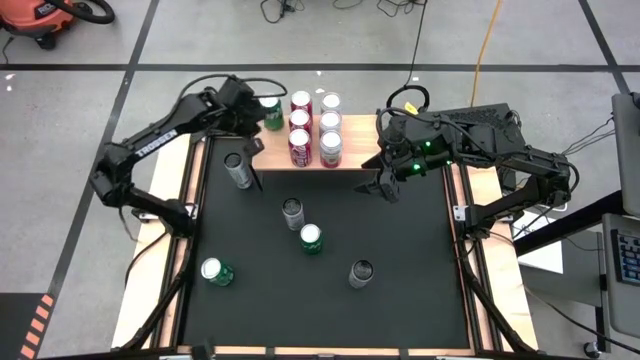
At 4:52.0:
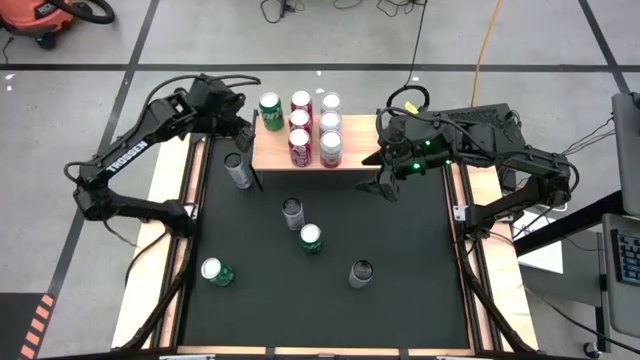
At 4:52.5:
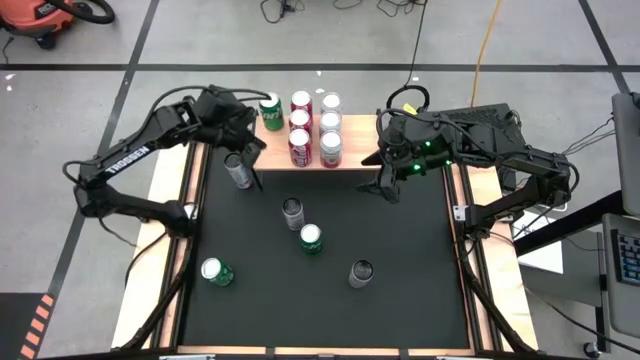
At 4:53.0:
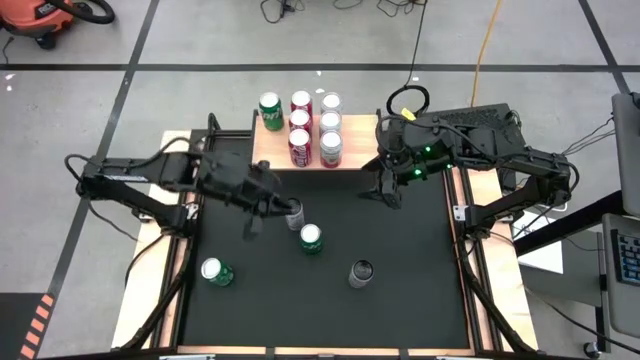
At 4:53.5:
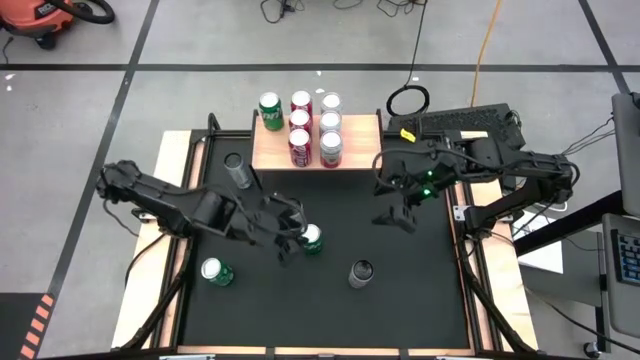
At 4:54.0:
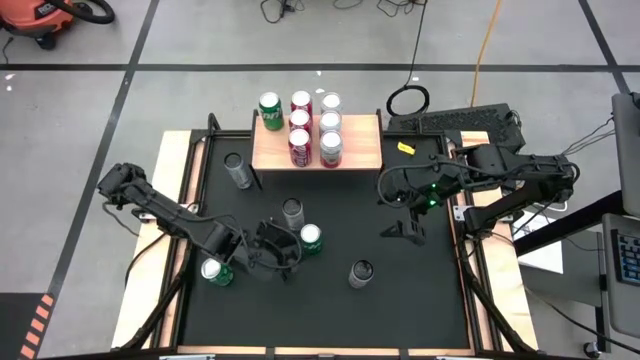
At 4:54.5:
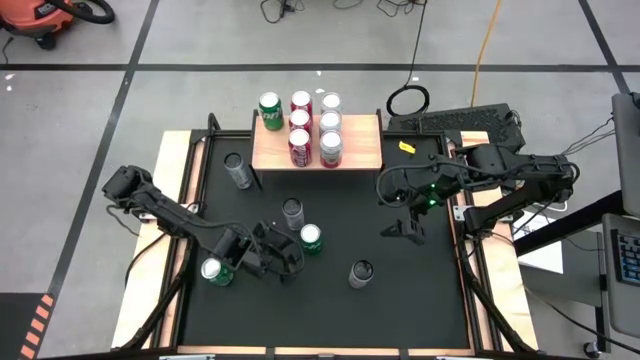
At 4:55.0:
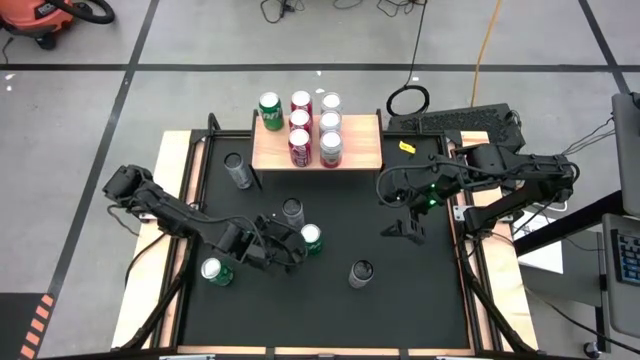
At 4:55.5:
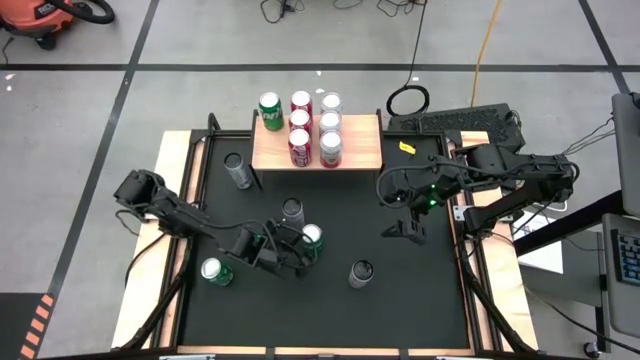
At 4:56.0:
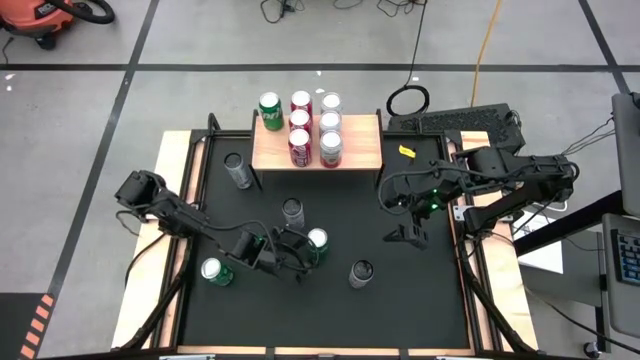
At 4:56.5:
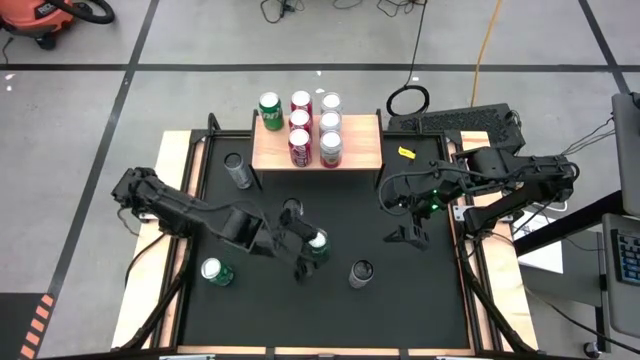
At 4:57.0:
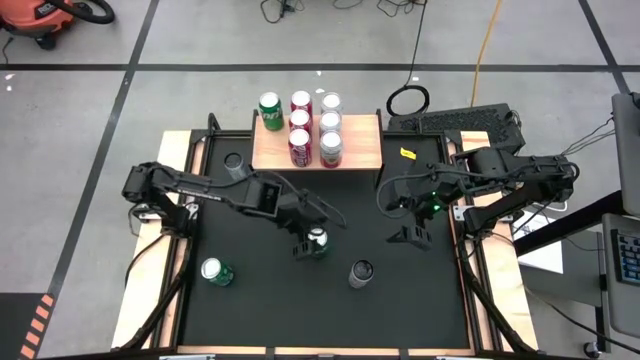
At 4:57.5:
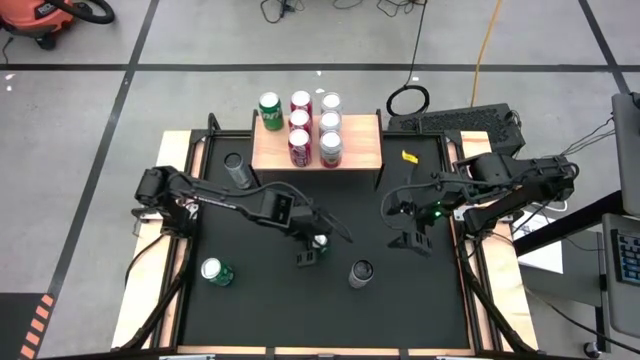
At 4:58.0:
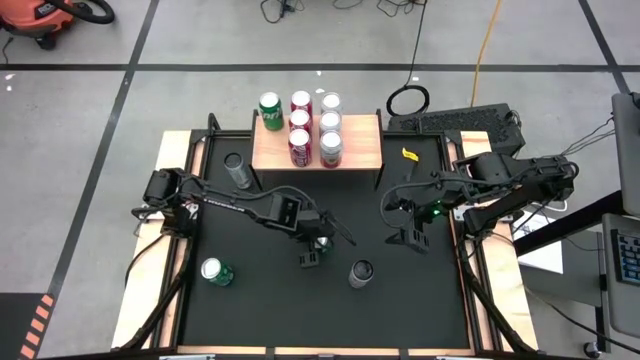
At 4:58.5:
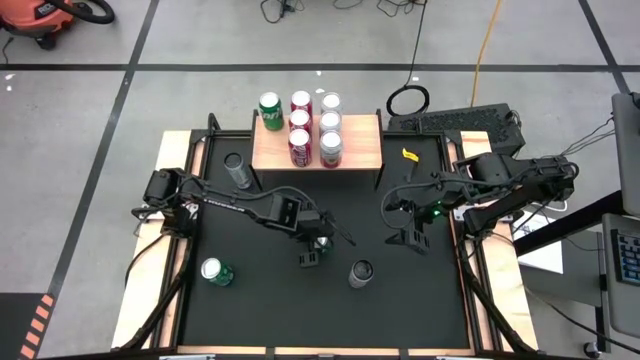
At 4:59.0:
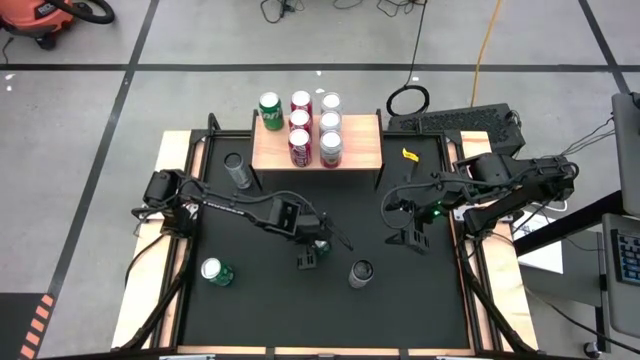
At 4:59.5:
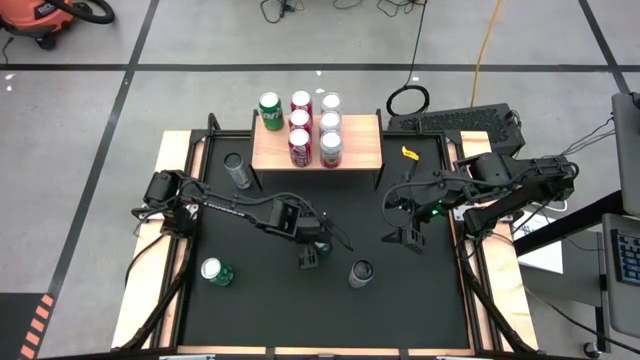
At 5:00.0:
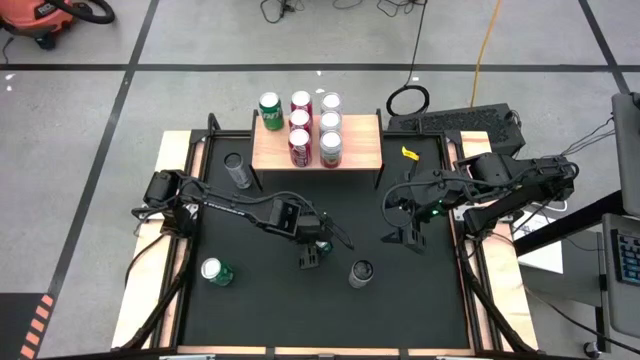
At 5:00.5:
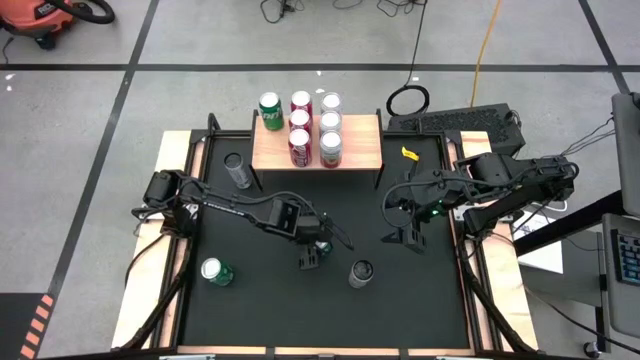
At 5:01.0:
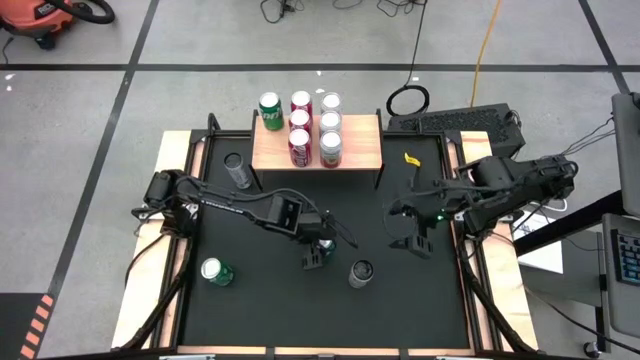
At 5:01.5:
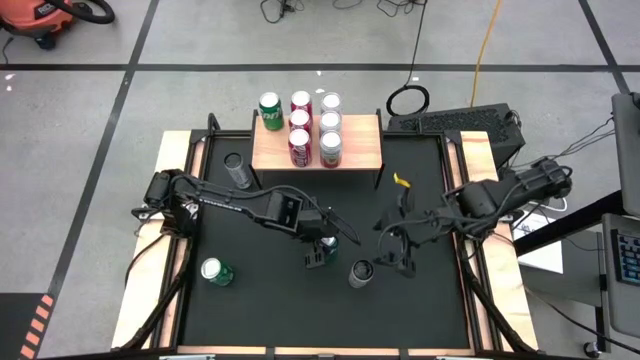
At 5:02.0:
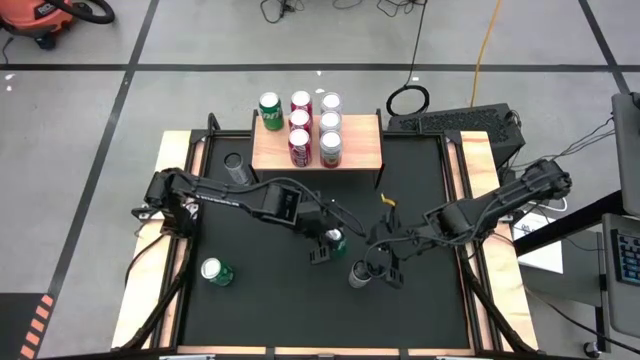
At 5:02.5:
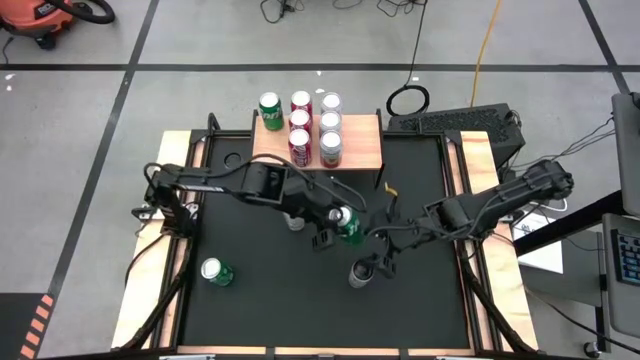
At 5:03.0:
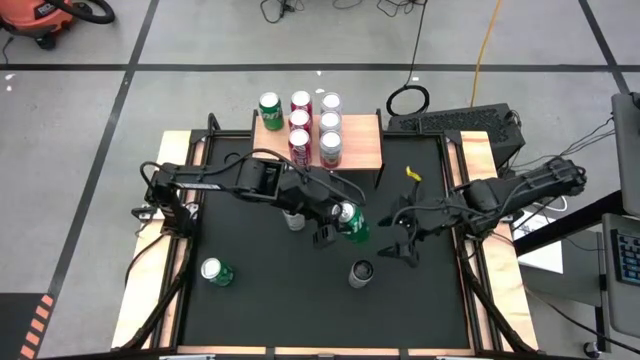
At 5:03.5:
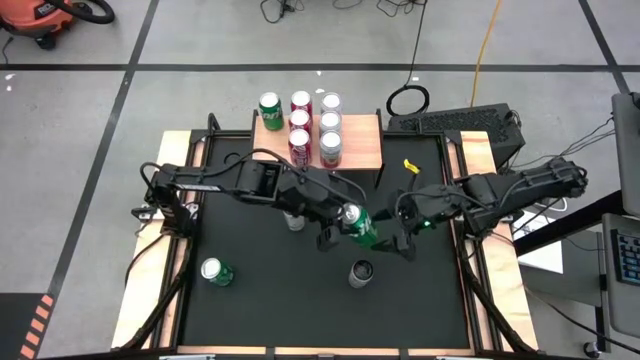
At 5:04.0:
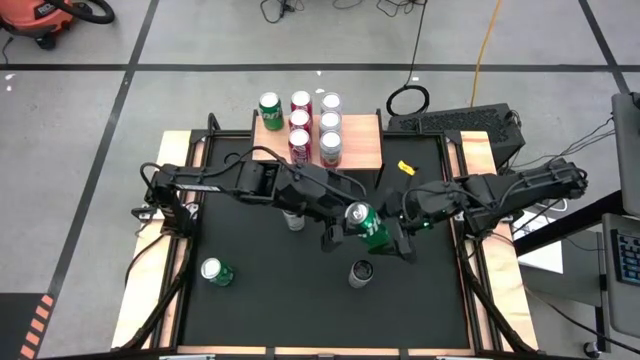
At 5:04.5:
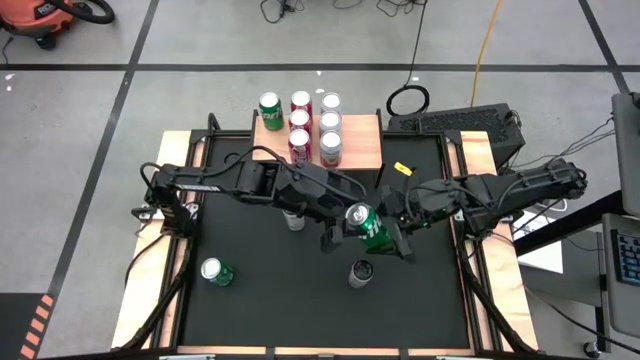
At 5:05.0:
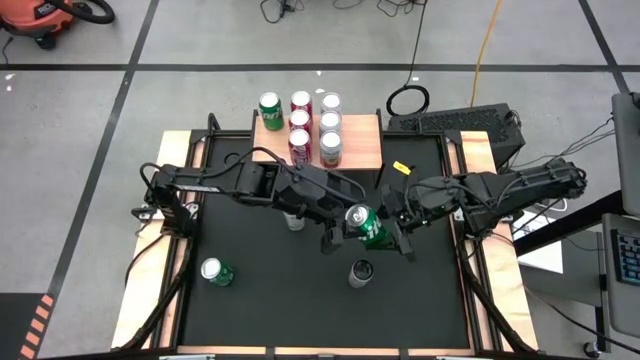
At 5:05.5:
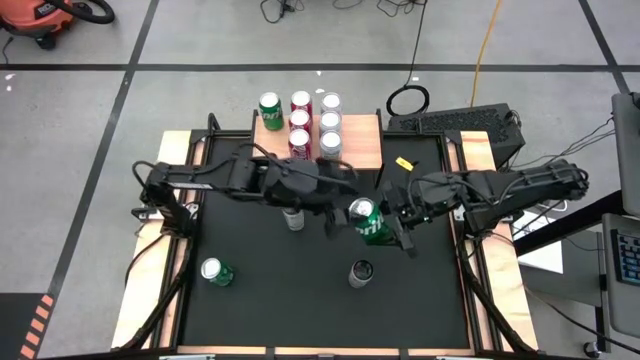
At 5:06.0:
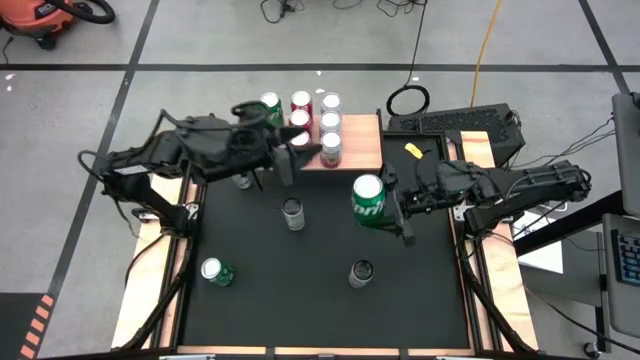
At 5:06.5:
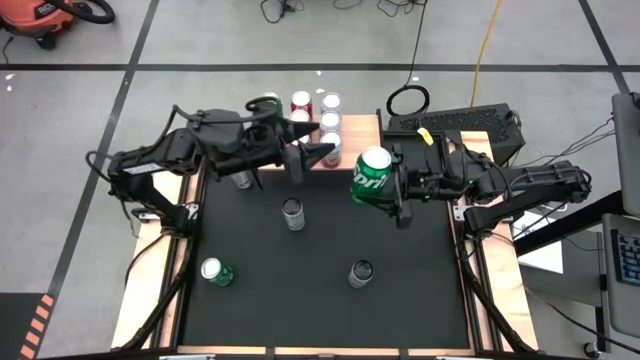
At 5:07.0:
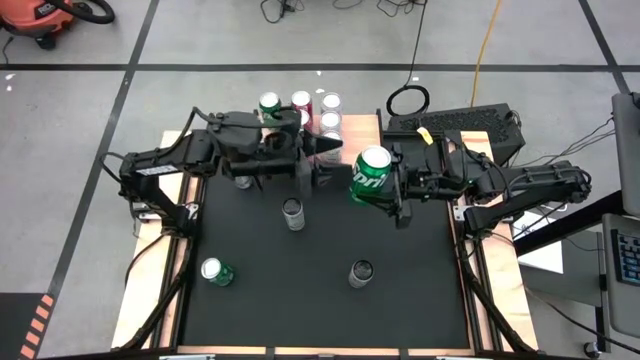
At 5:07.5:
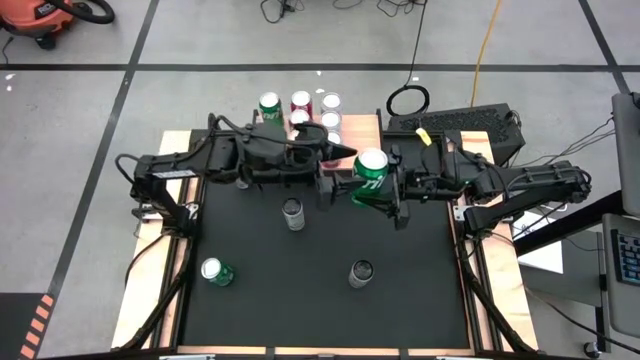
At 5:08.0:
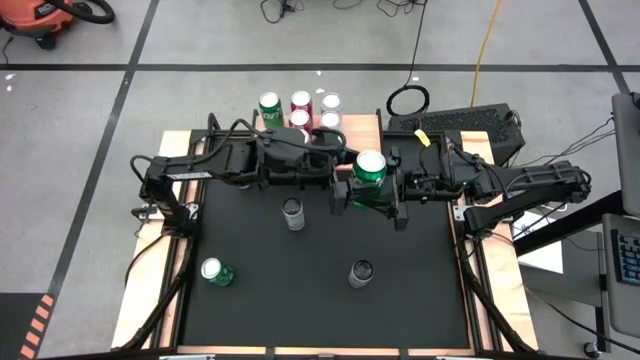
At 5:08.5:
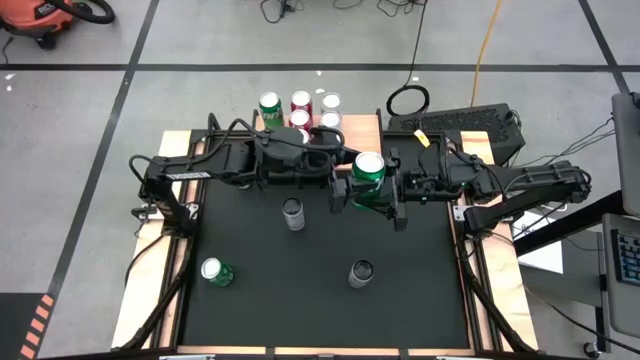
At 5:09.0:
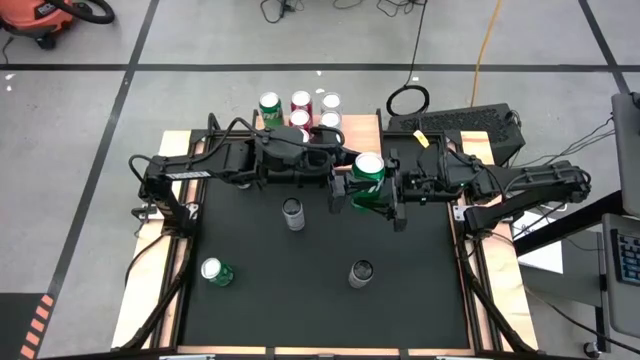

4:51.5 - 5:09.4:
Task: Place canned beverage on shelf
Put the top green soda can on the shelf aligned with the other green soda can

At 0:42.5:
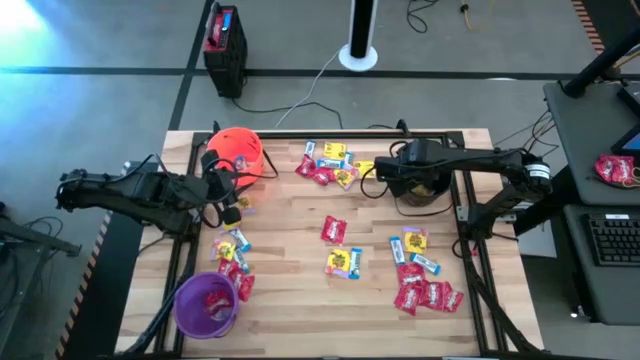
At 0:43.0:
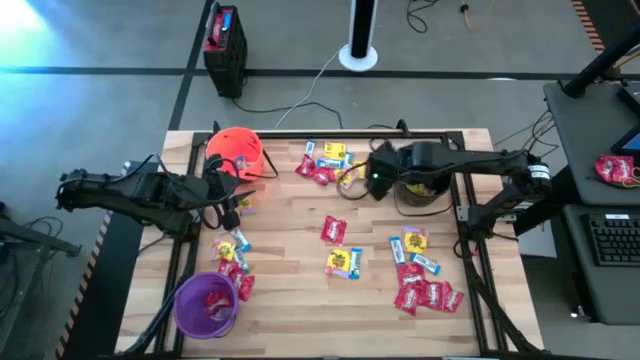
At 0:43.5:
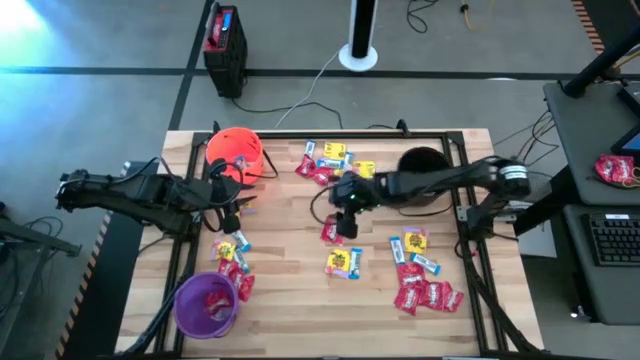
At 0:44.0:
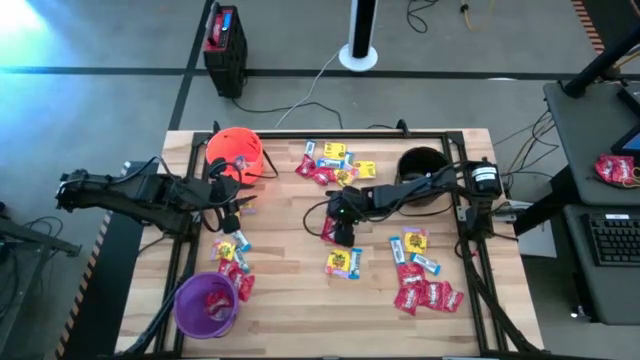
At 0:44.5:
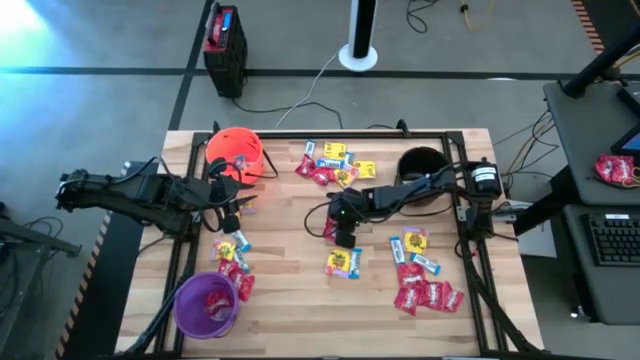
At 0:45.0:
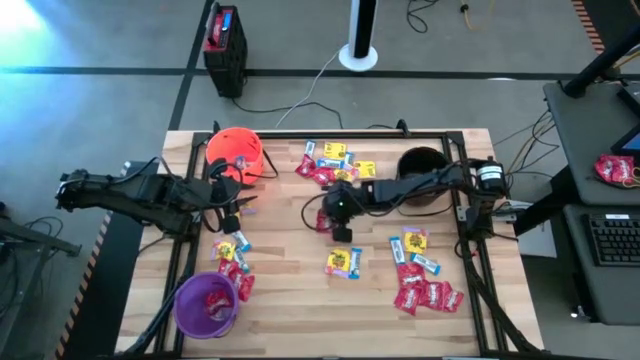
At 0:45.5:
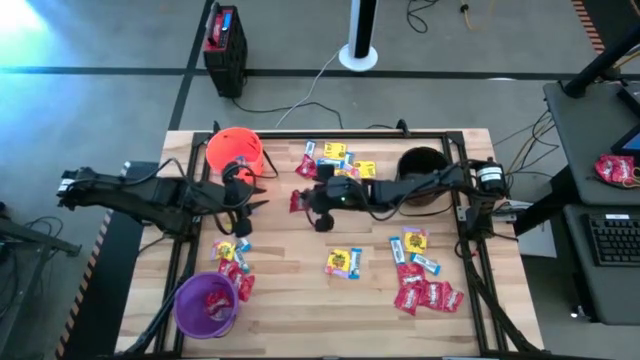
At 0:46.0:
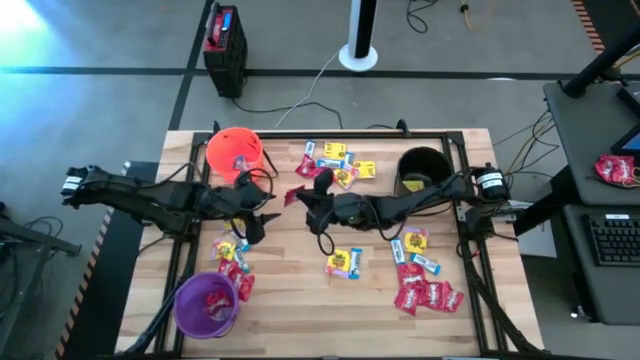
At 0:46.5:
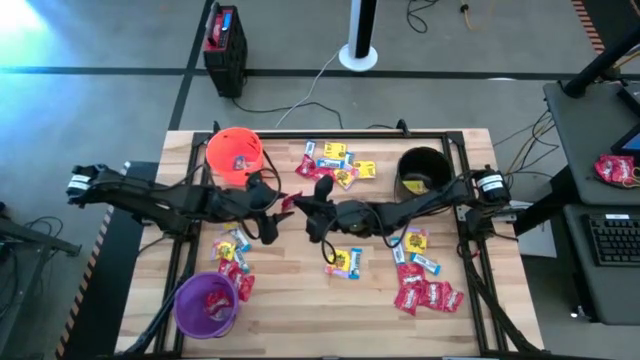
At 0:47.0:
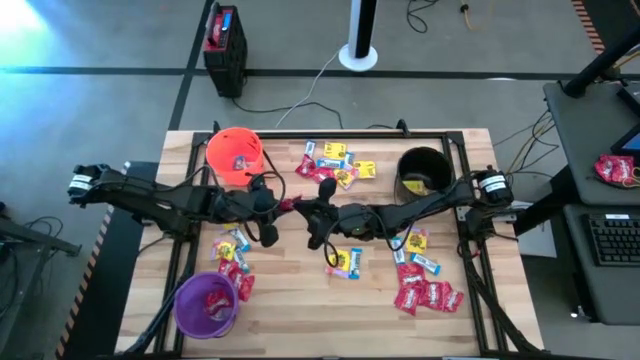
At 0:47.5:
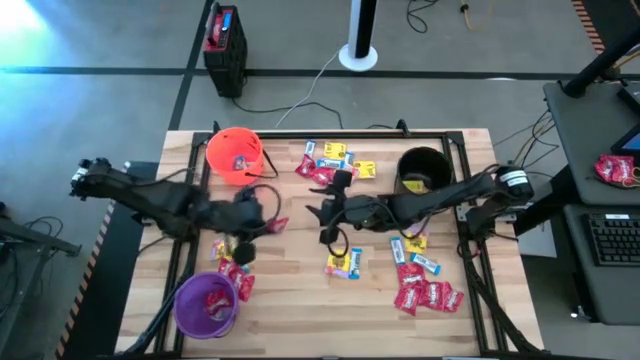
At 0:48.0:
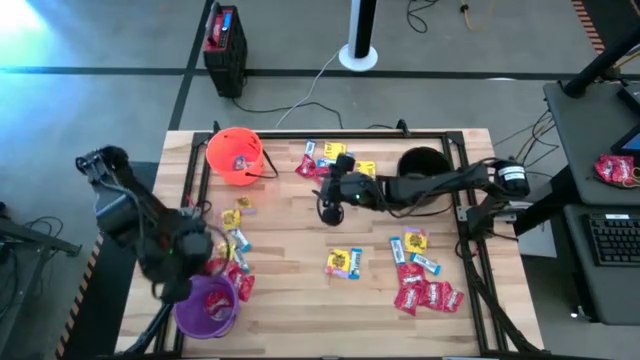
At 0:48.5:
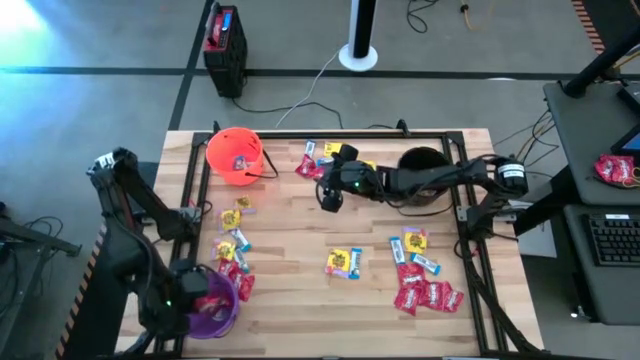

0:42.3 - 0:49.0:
Task: Sort candy by brand, put in halloween buckets
Put the red candy into the purple bucket
